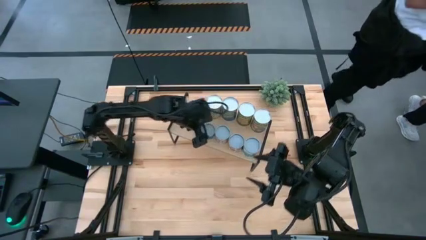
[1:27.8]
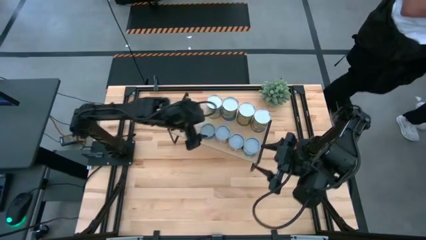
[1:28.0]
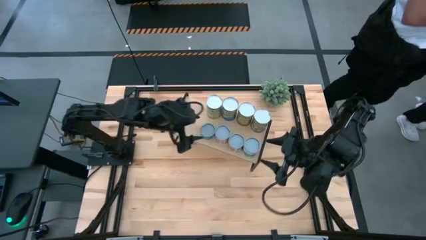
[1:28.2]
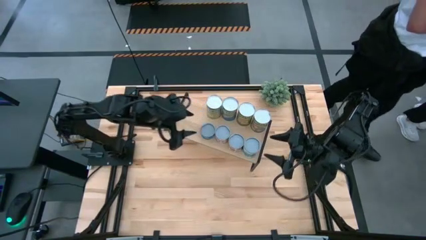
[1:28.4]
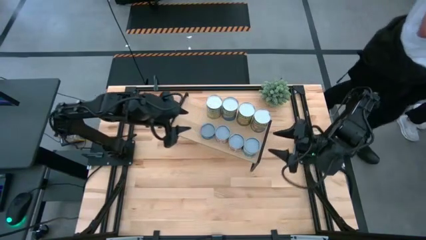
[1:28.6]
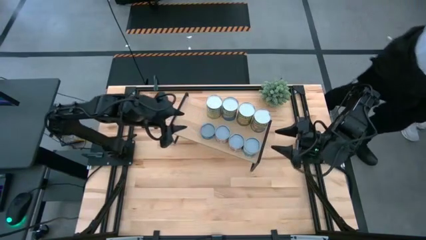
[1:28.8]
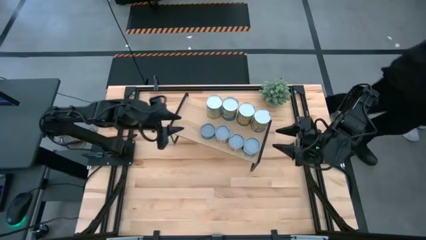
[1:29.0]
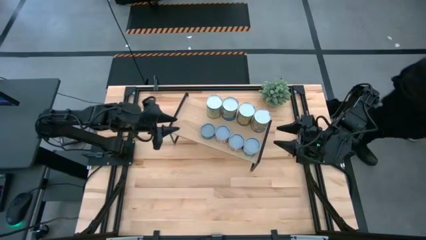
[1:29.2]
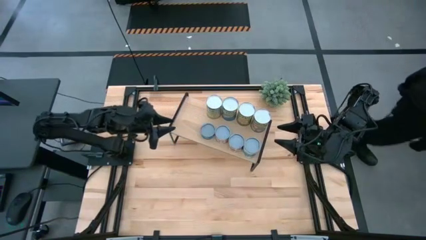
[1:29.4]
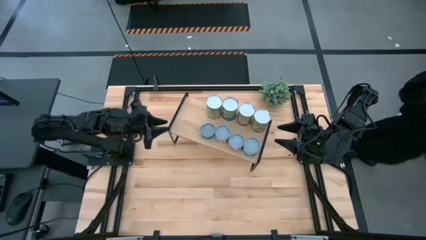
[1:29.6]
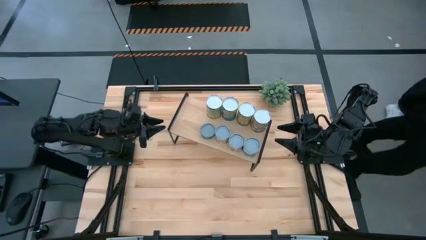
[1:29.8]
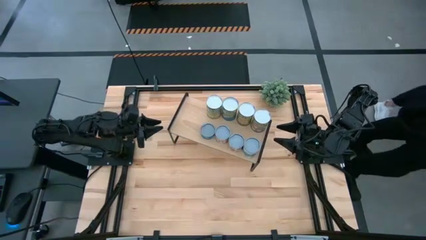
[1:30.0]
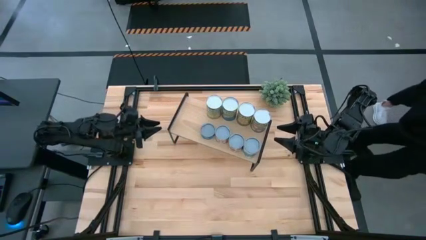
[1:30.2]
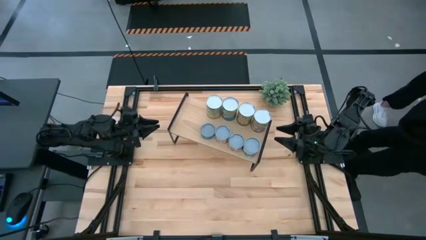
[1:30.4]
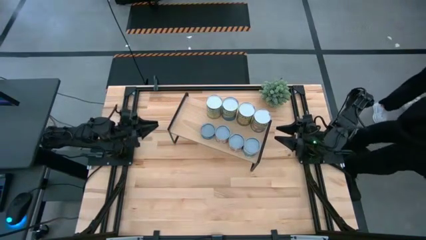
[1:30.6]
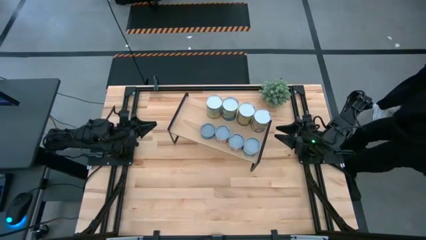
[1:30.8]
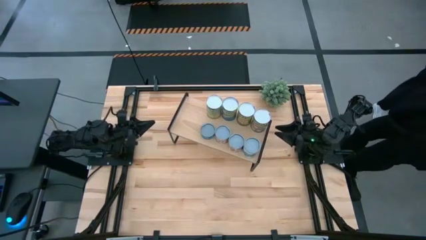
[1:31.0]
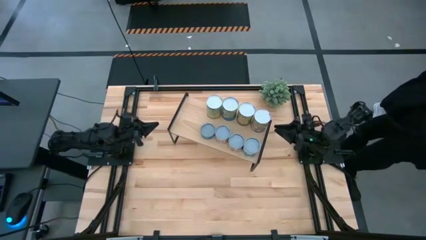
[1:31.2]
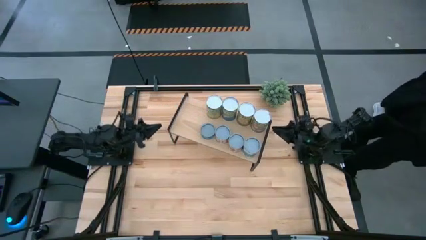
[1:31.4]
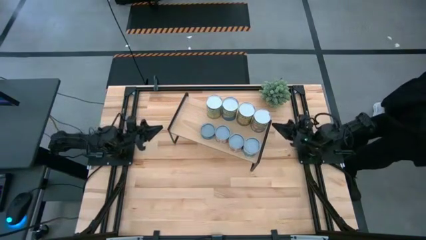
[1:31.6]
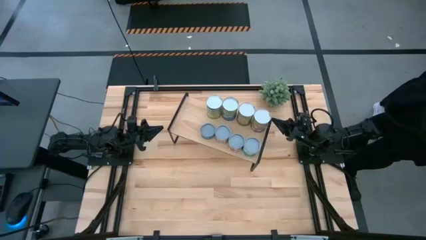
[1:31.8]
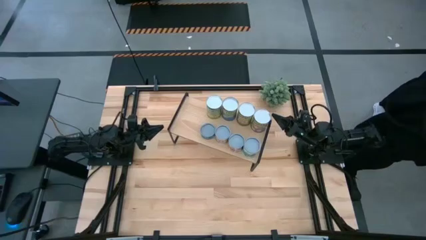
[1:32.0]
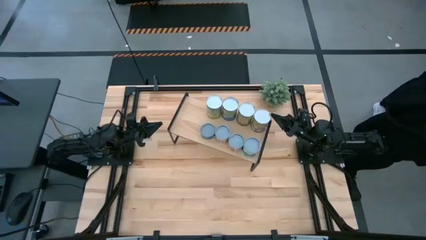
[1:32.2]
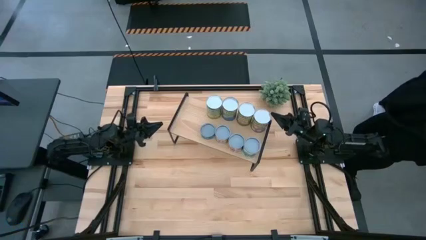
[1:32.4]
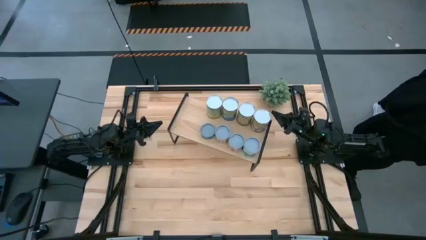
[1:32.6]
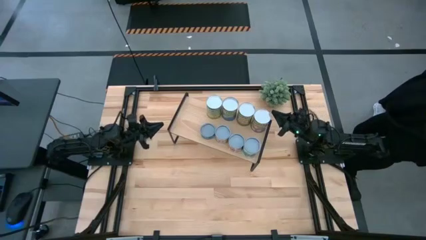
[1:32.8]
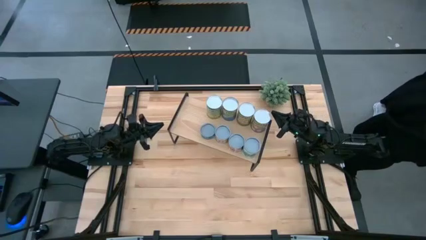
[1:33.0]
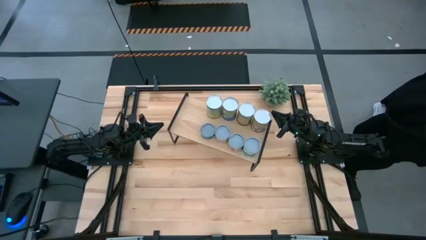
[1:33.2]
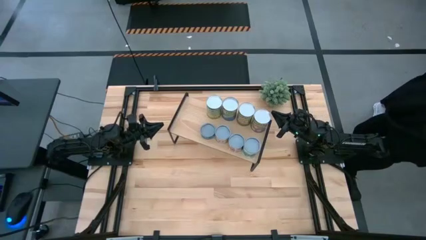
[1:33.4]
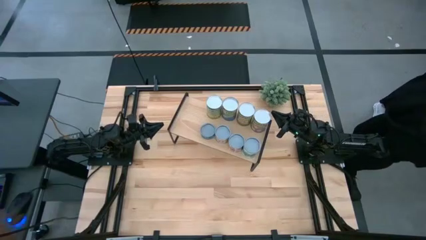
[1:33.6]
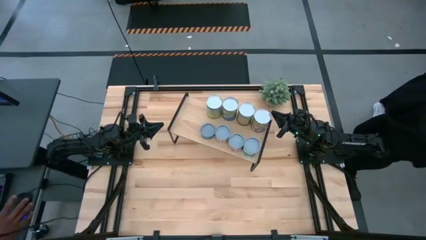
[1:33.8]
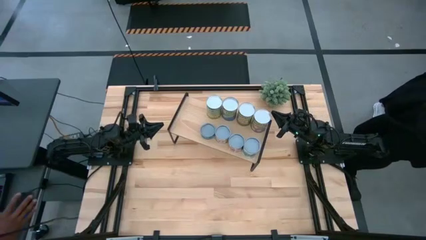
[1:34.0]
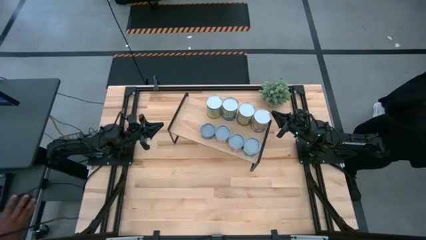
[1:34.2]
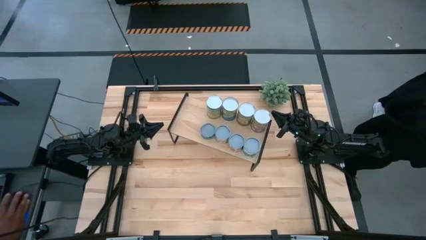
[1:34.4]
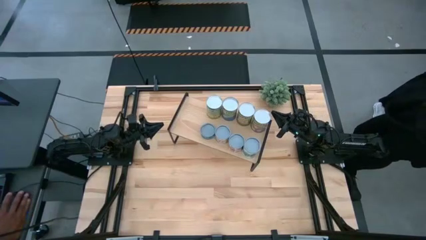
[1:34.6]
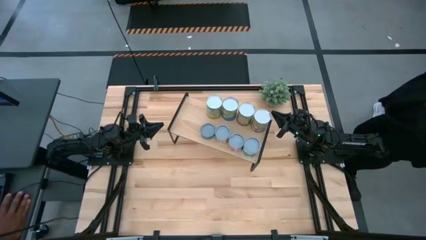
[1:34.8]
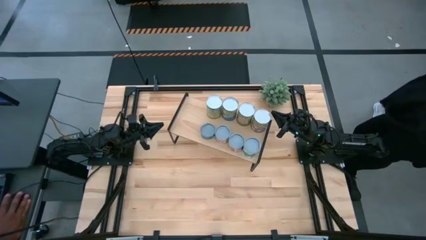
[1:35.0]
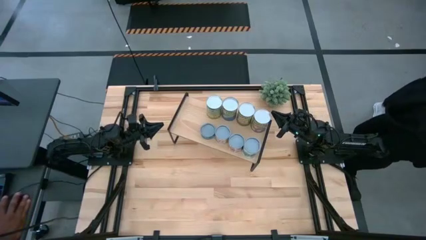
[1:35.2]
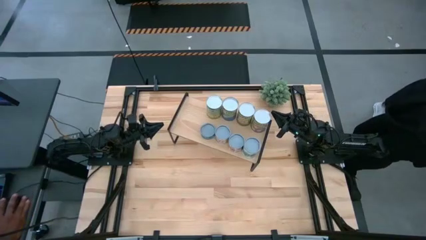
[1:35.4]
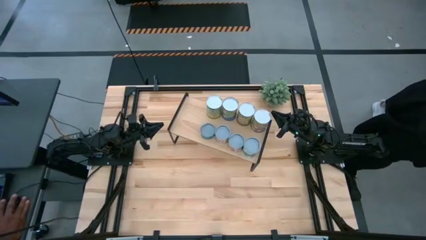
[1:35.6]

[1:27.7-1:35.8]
Task: Pick and place cans onto a shelf
Return to Home Position

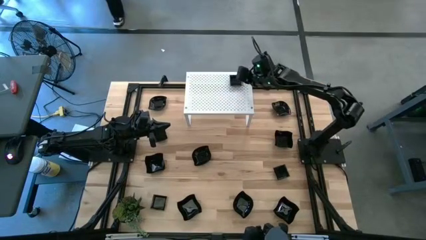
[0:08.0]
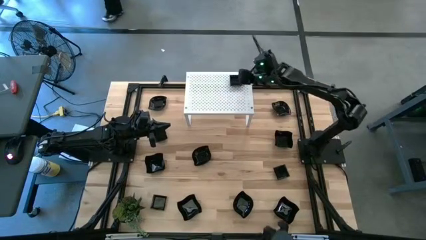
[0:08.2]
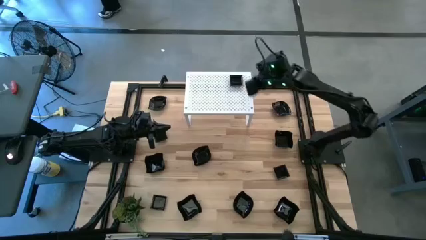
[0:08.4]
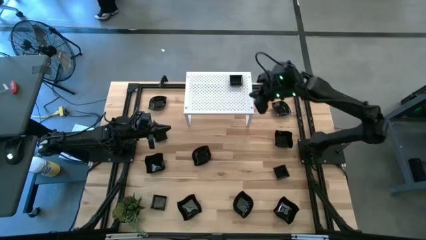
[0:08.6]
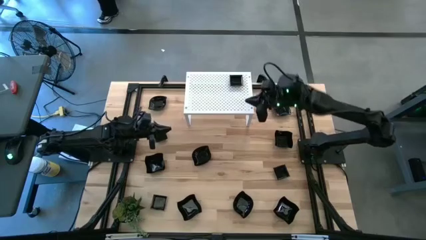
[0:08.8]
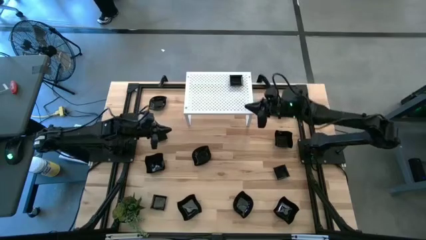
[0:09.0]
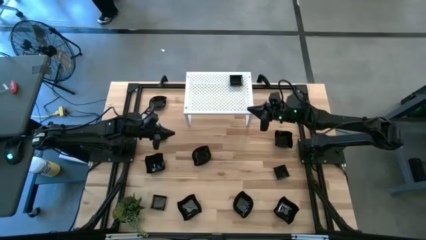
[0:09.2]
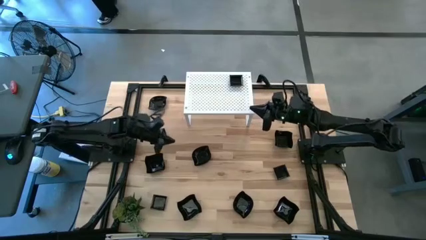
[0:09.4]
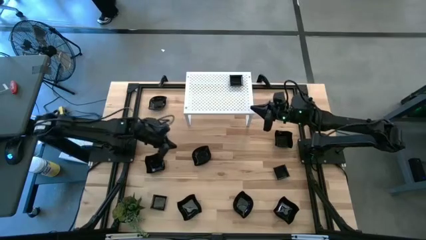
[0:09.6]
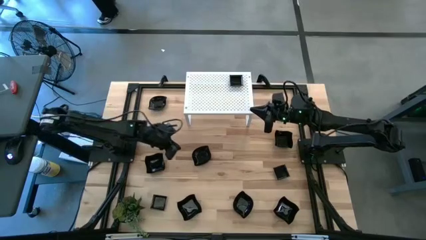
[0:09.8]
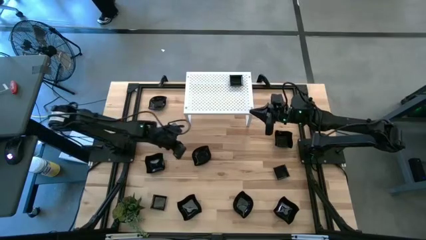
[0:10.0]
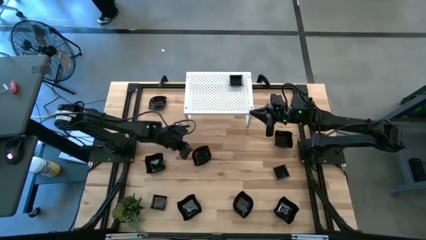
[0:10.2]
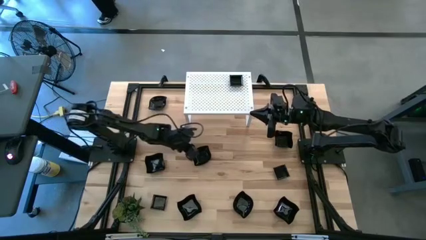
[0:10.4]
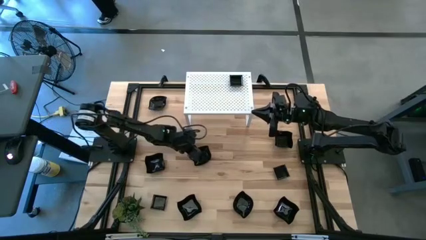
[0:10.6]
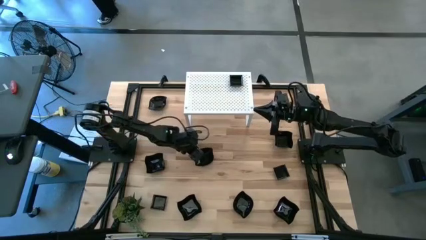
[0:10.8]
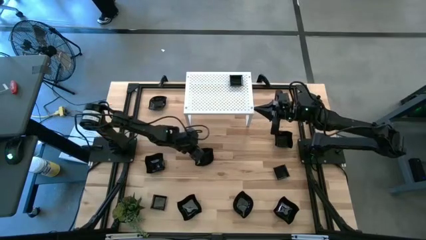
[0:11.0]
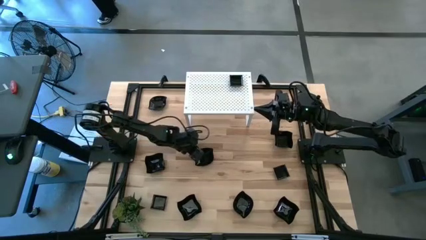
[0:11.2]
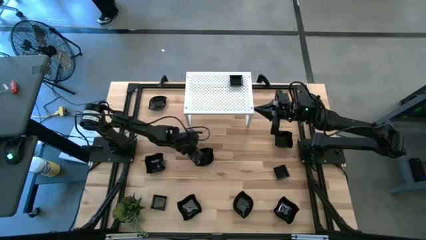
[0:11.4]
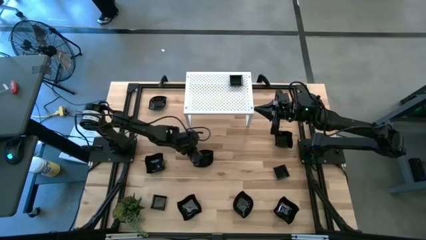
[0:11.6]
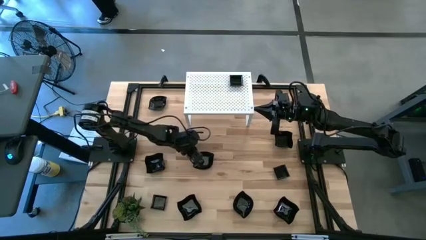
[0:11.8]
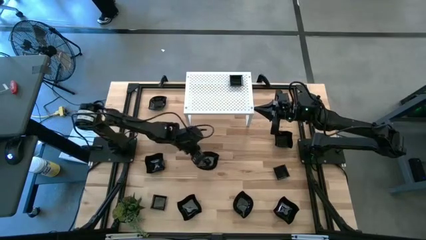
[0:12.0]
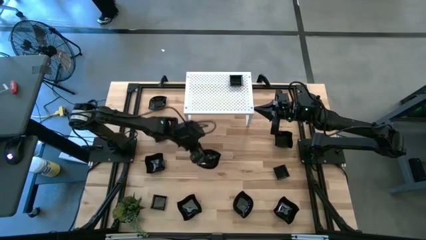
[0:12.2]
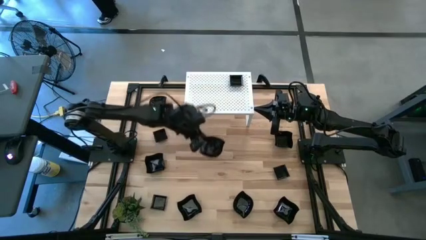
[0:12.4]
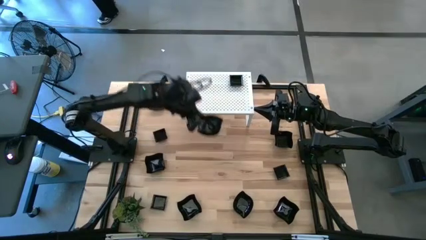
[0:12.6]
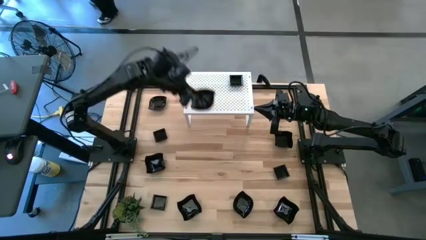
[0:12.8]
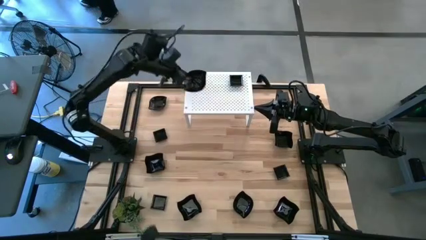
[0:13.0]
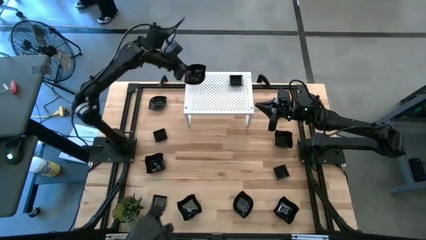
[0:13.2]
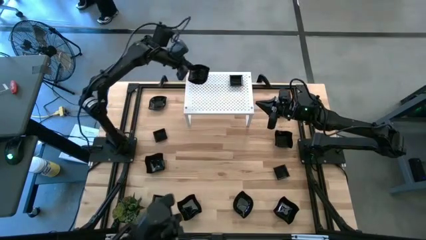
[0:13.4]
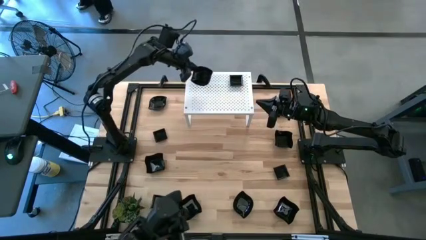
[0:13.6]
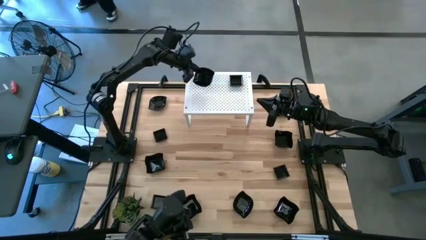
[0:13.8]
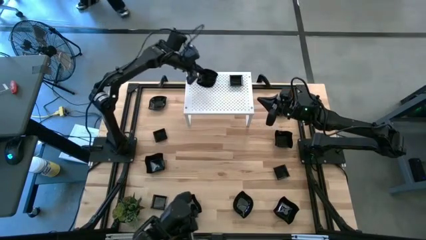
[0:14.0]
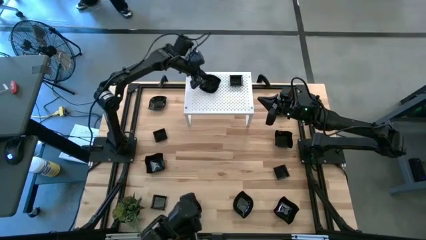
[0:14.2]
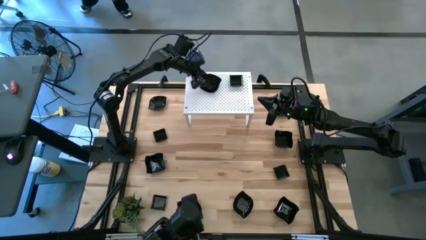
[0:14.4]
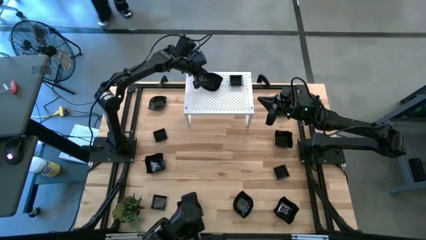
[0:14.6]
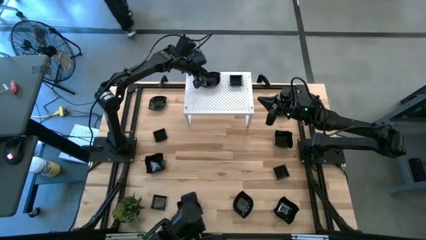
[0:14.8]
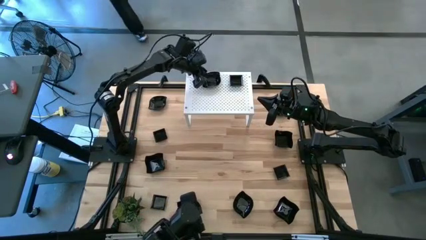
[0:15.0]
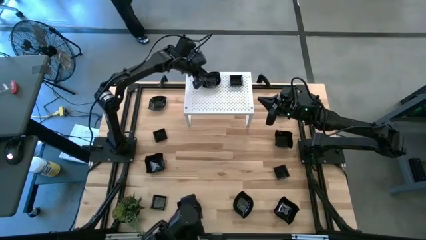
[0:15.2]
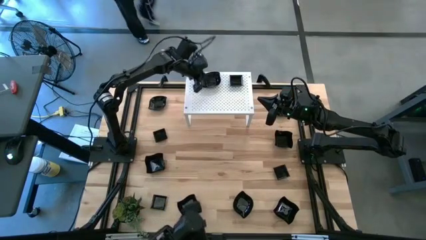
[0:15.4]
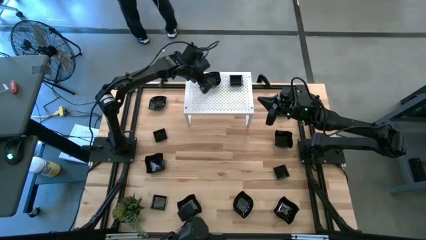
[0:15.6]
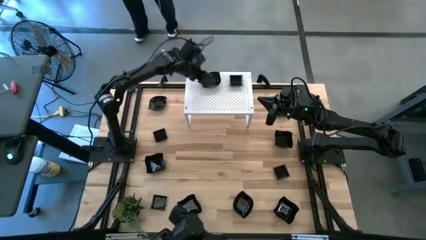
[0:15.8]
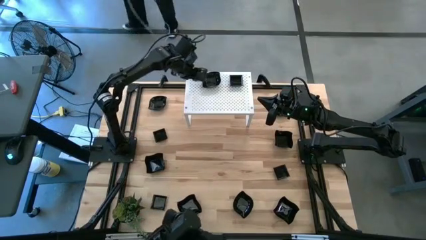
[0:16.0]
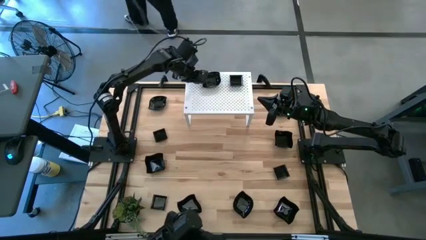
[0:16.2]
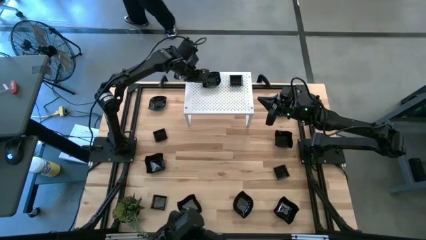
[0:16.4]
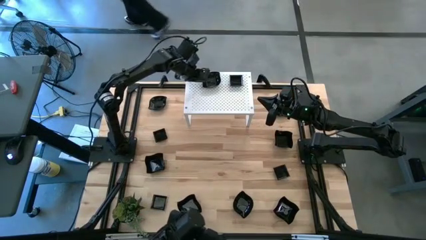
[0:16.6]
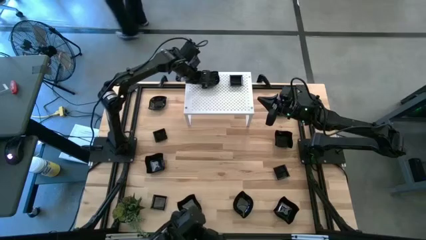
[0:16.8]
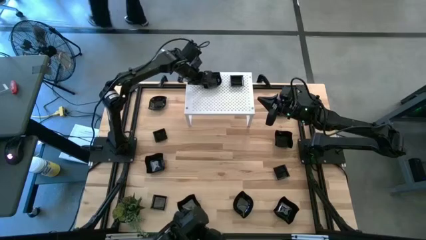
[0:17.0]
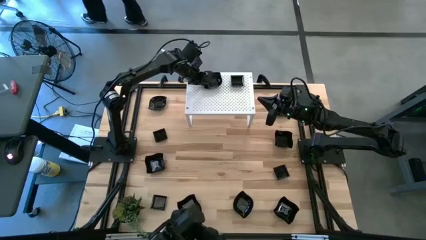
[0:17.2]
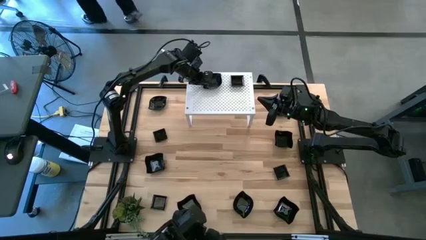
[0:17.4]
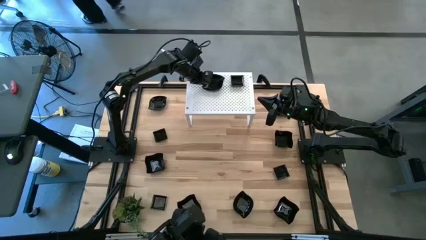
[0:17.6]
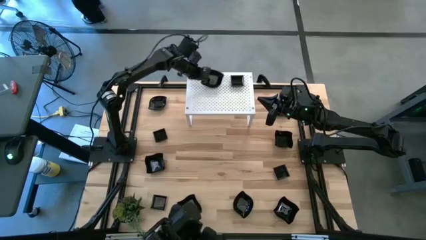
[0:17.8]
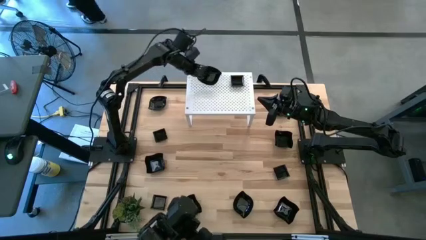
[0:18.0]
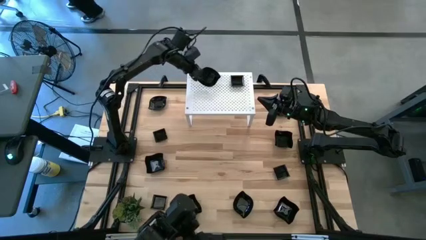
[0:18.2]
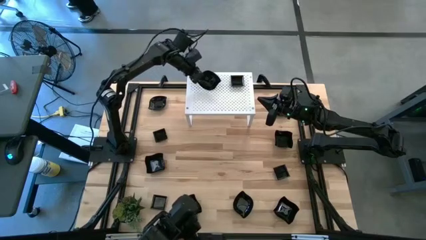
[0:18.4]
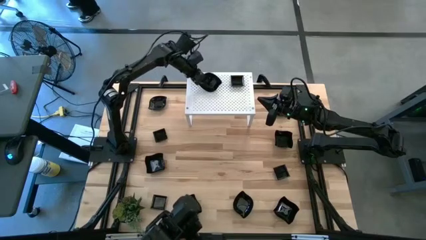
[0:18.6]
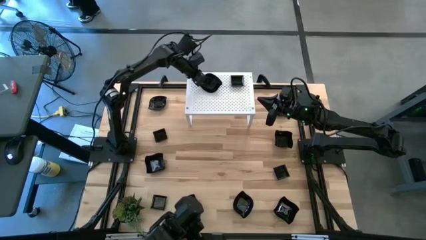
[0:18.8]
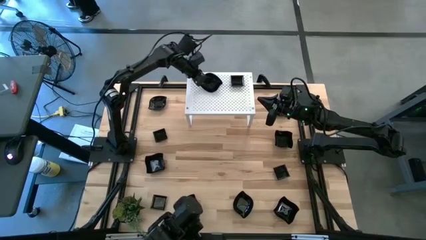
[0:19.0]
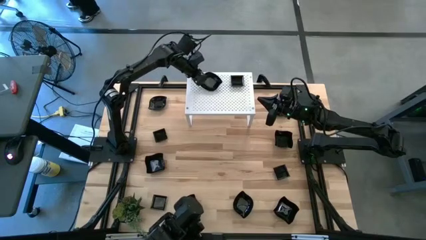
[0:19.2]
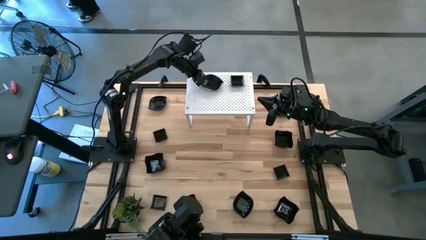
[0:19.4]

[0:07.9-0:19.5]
Task: Pick & Place Mini shaped plates
Put the leaf-shaped plate on the shelf
